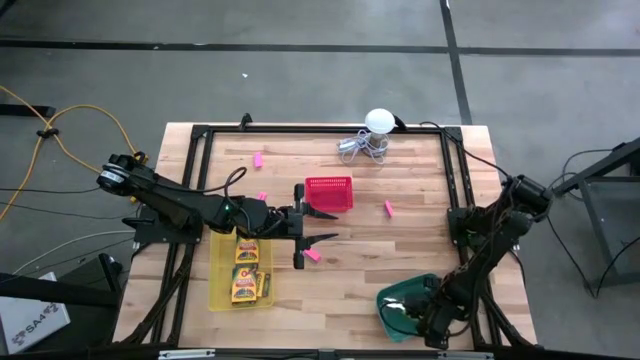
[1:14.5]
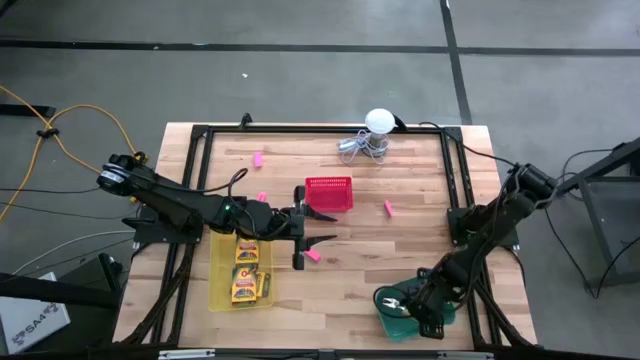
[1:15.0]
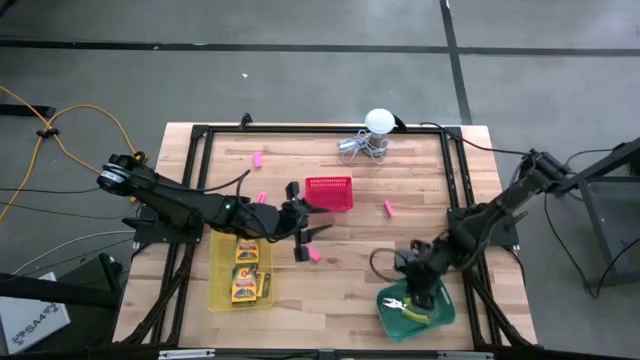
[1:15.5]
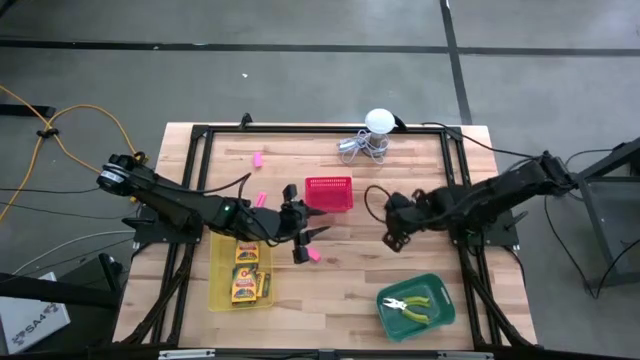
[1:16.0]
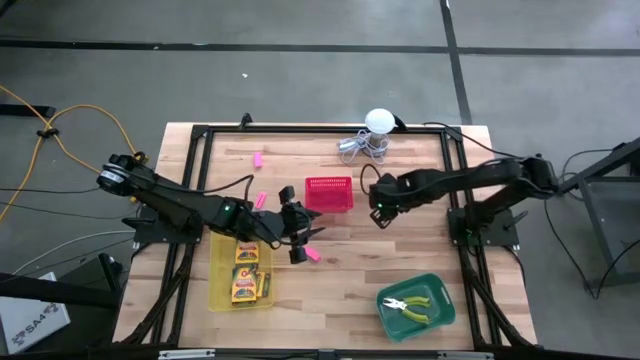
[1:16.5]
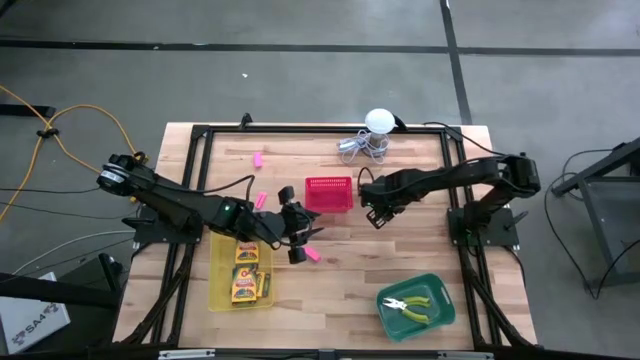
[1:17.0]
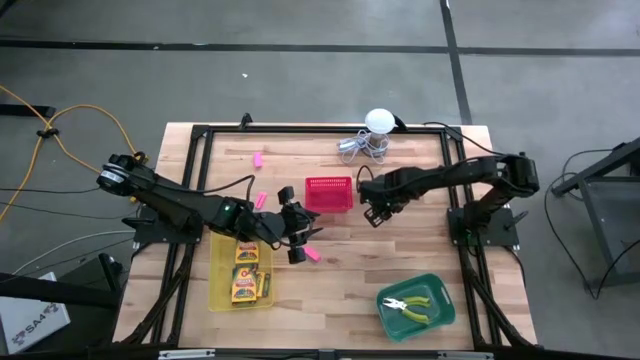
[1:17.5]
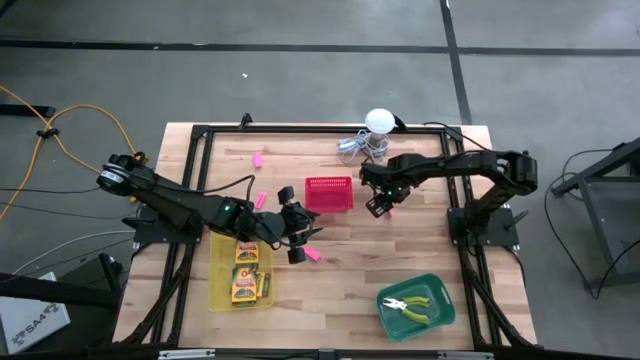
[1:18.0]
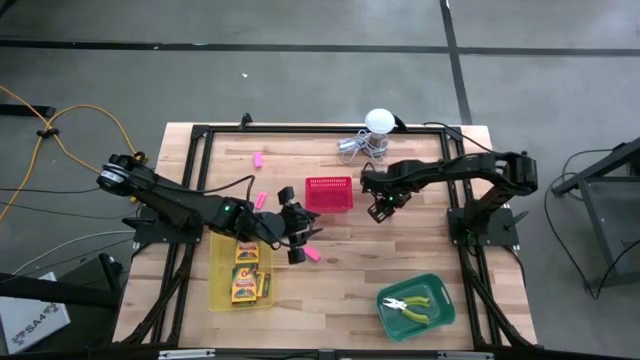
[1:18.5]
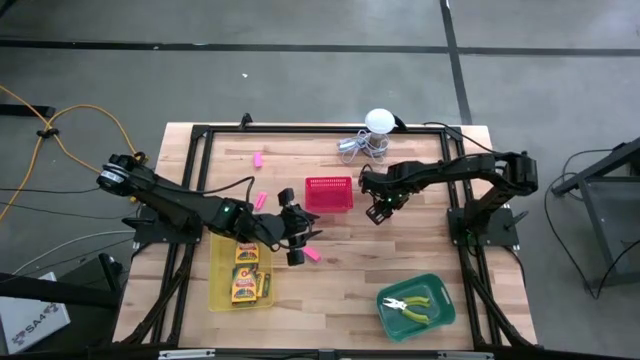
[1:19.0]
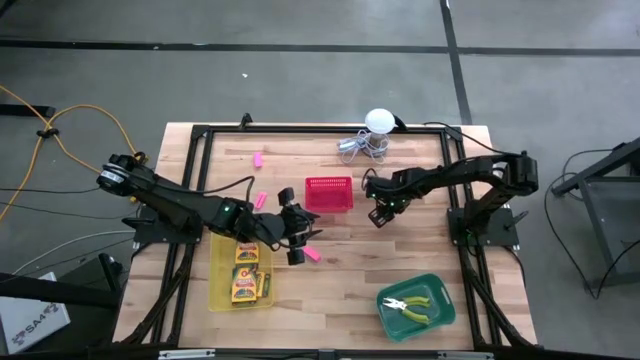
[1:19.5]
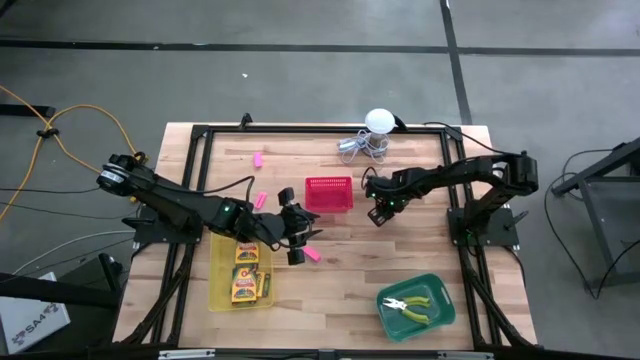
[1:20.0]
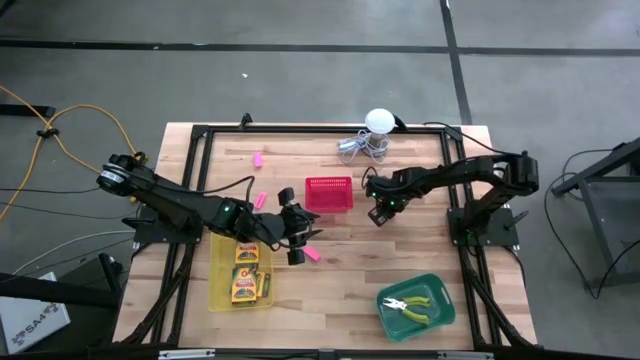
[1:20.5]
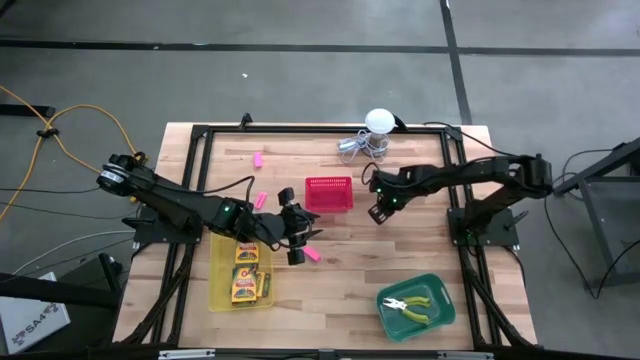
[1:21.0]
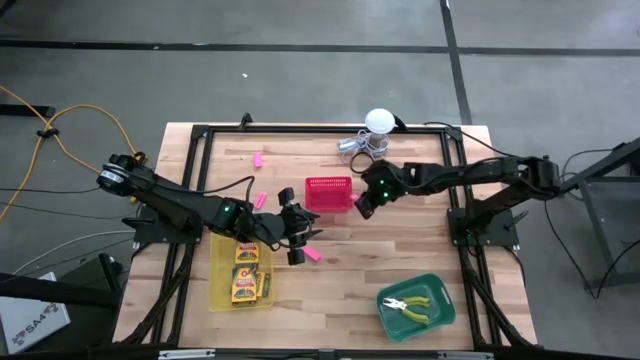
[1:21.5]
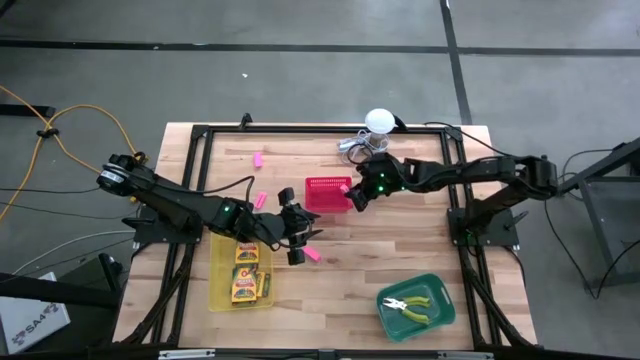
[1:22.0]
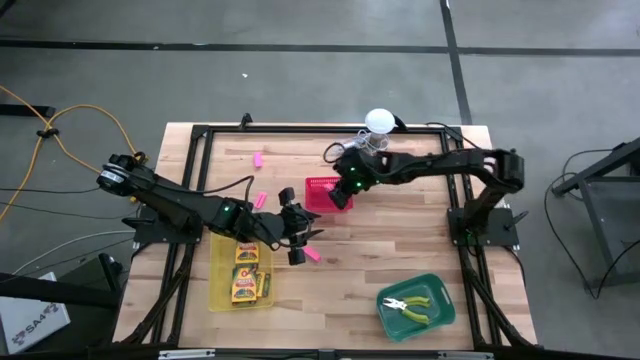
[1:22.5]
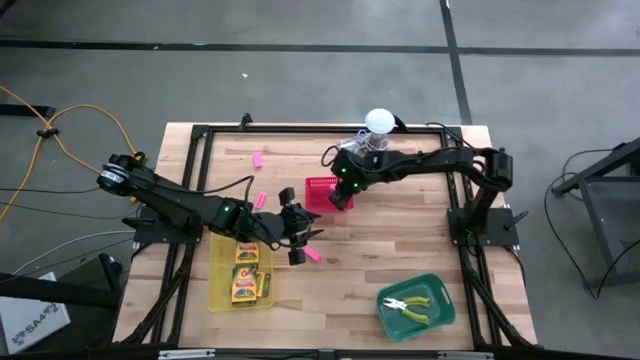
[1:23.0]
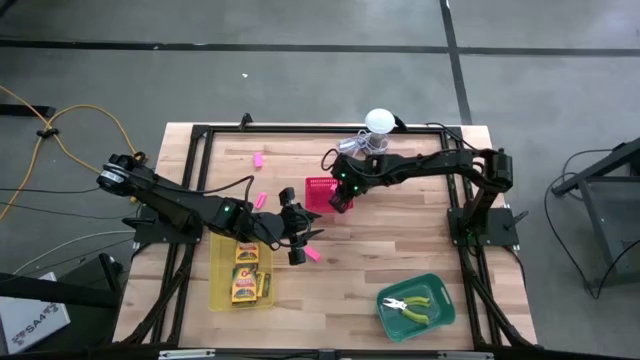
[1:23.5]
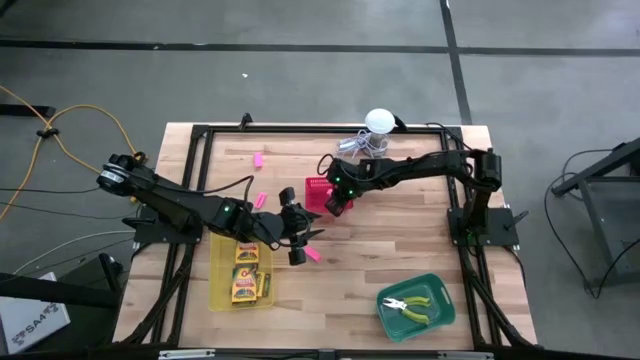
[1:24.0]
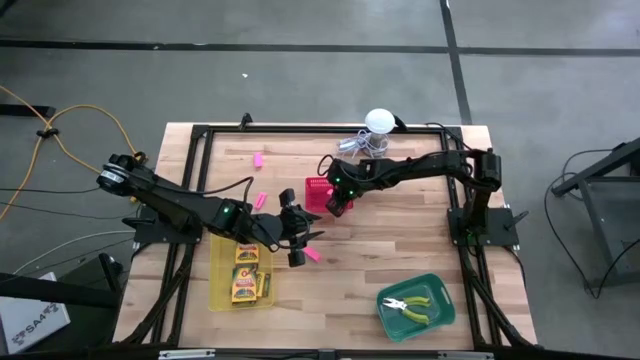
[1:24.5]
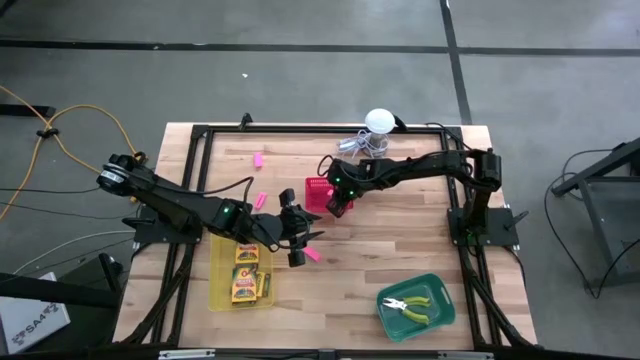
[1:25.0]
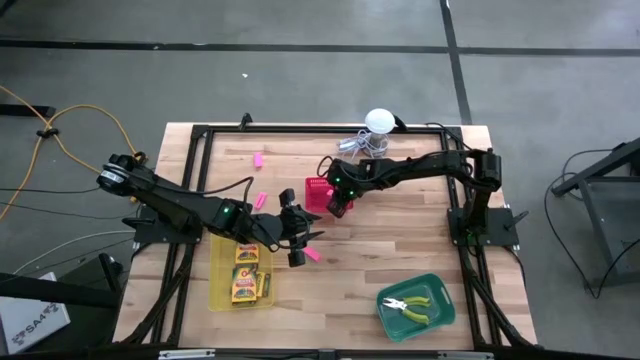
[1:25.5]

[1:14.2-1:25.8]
Task: Pick & Place School Supplies
Put the pink eraser into the red bin

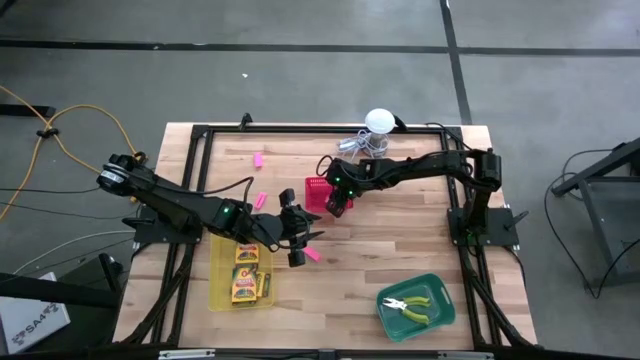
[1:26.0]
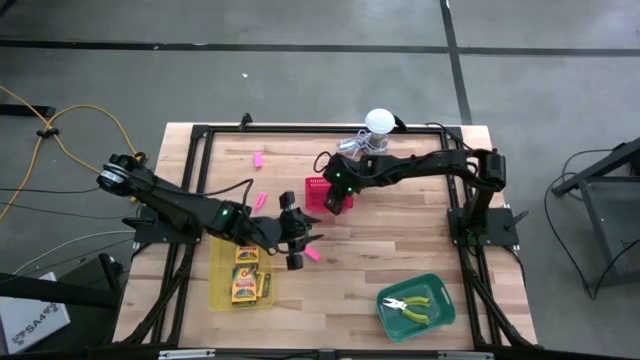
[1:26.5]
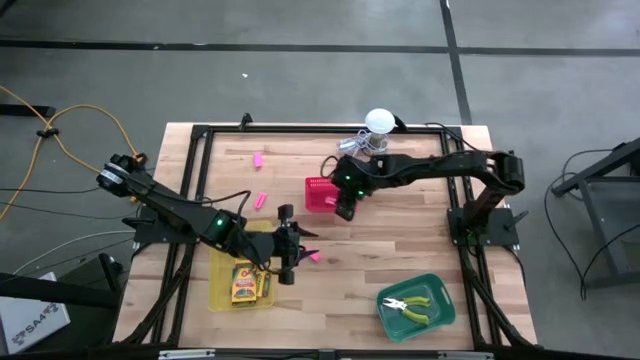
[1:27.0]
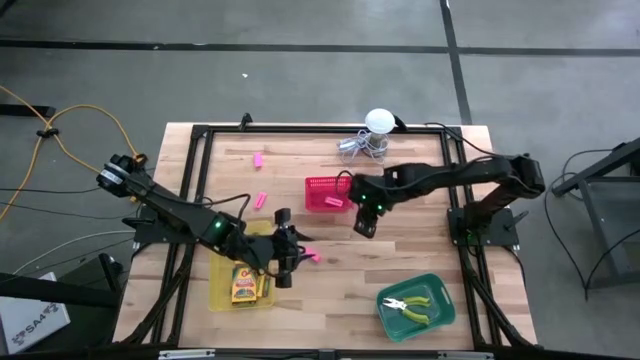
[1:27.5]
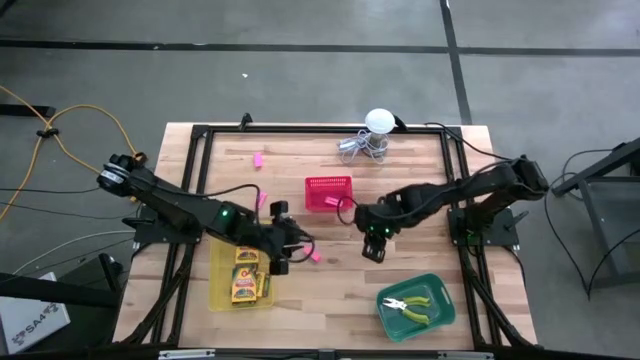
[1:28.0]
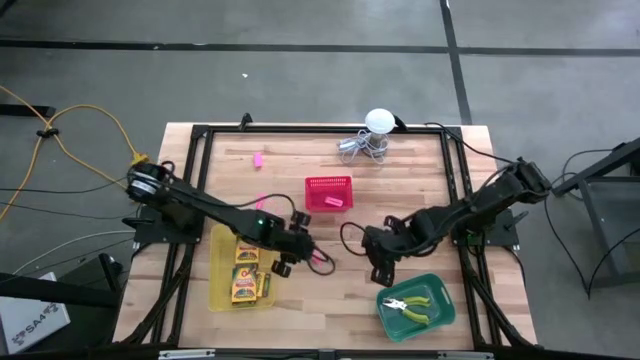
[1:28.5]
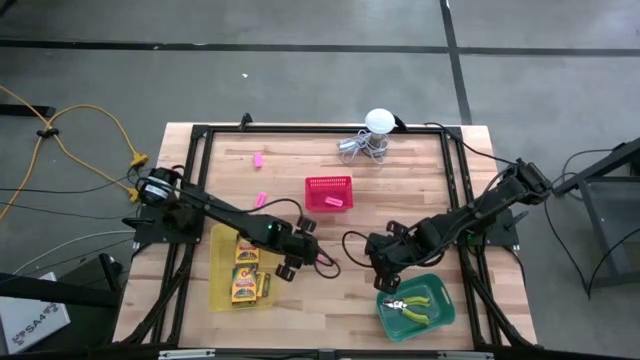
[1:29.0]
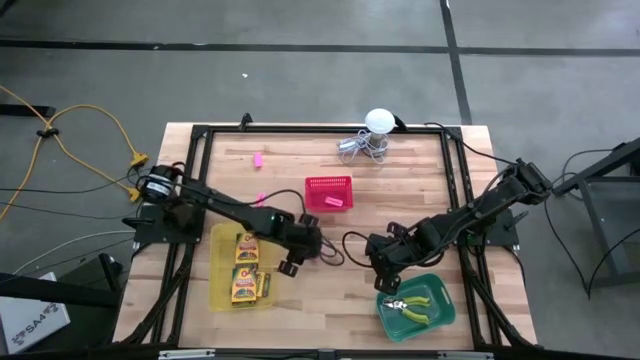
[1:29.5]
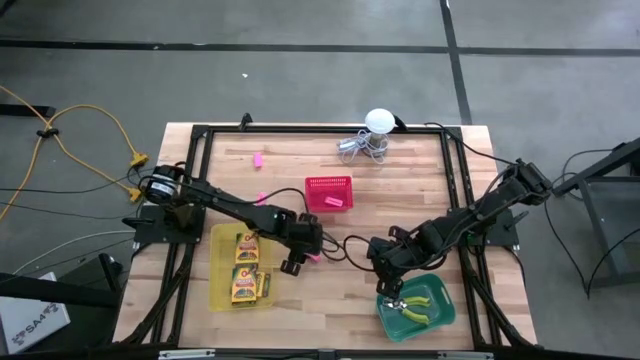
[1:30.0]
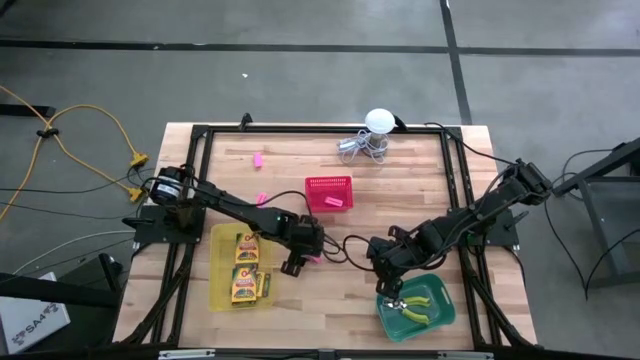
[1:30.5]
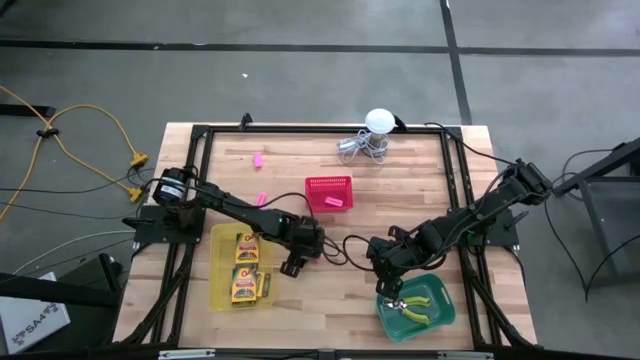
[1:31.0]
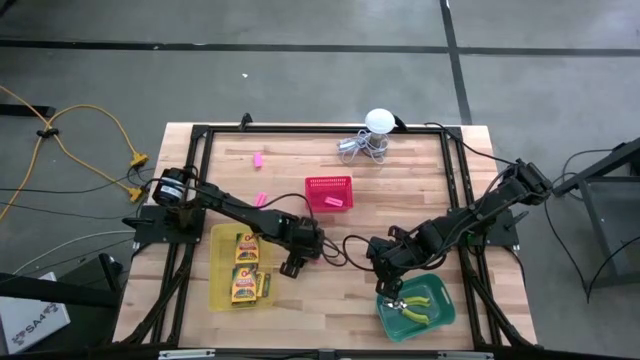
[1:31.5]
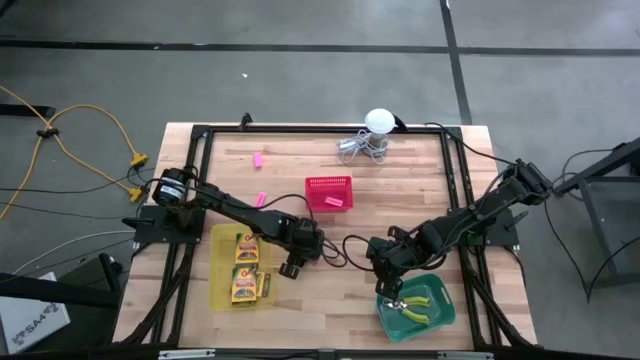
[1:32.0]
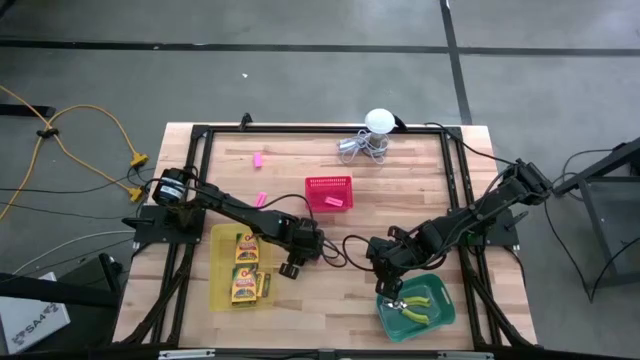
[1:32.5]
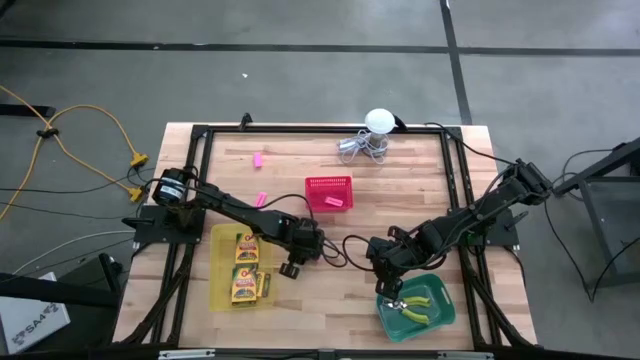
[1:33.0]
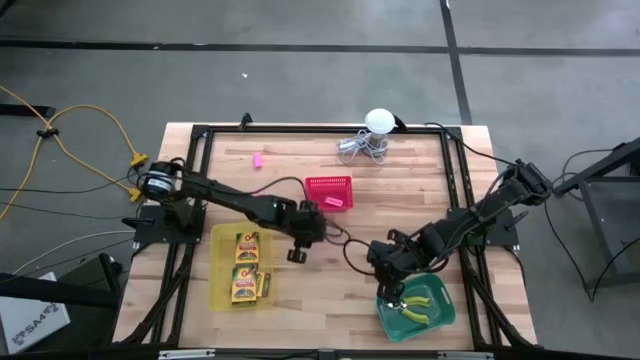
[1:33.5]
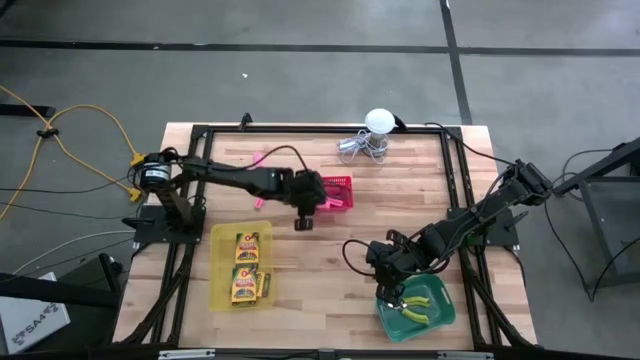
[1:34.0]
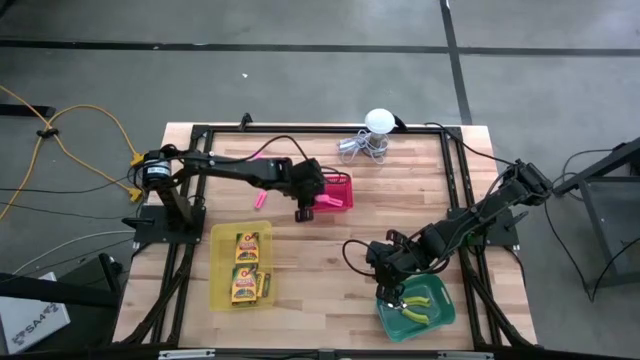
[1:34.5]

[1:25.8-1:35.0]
Put the pink eraser into the red bin

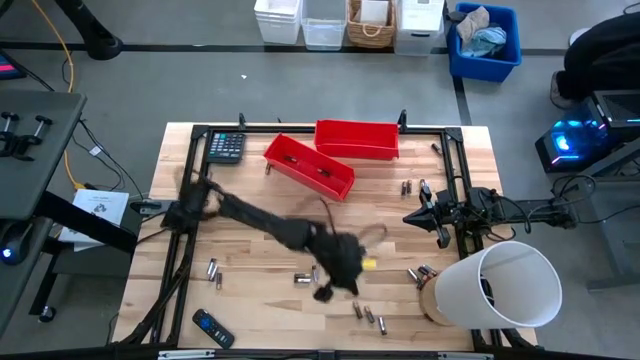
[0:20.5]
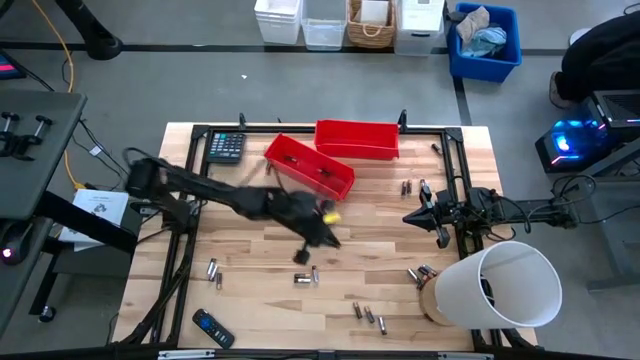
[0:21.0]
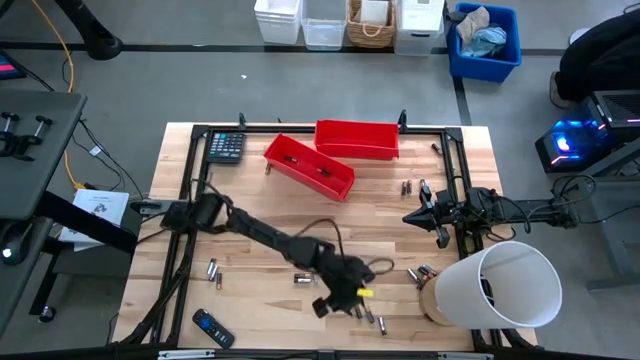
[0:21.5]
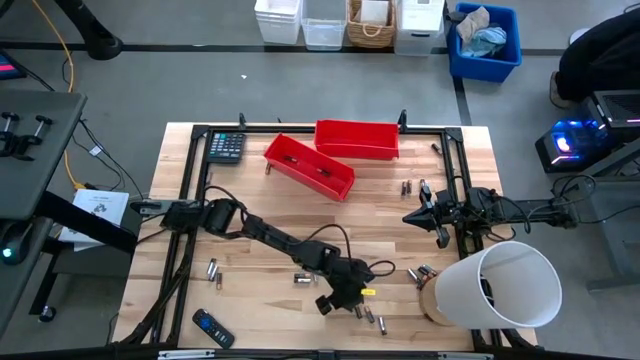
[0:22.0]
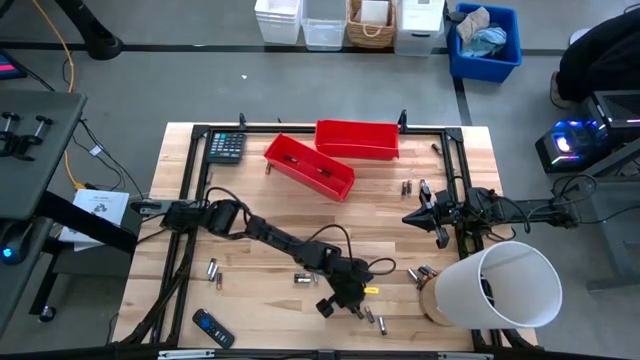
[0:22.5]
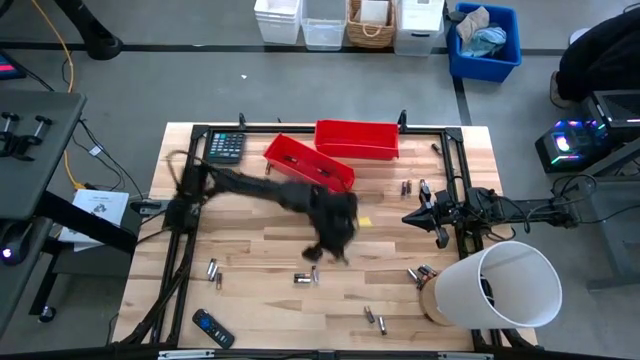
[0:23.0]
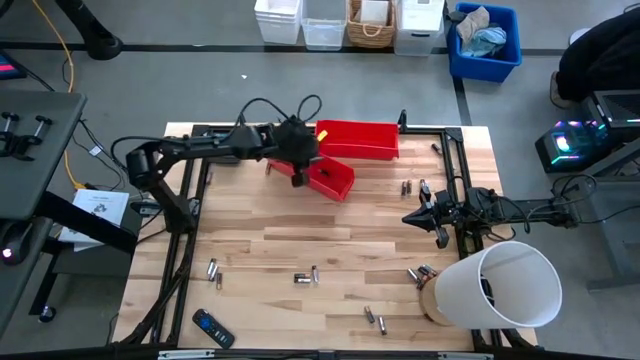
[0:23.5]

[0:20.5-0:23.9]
Task: Sort batteries
Put the black battery into the bottom red bin
